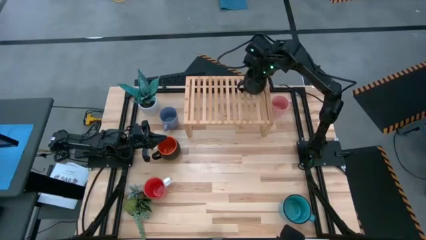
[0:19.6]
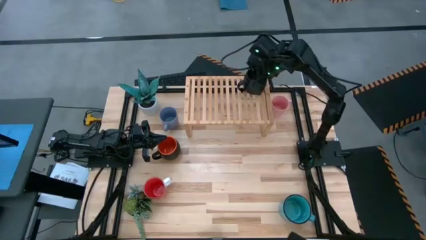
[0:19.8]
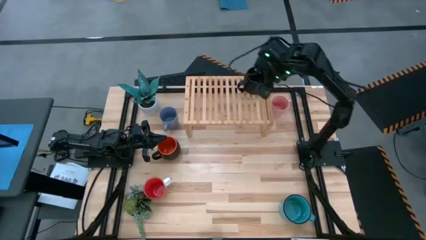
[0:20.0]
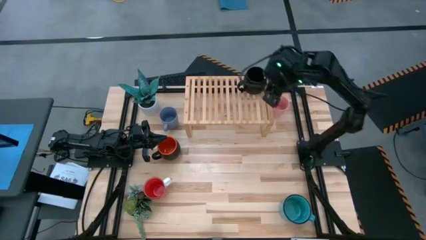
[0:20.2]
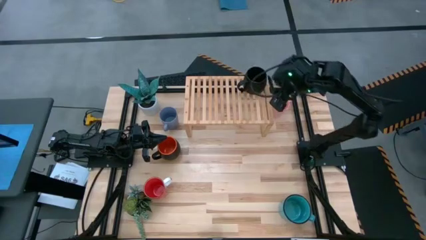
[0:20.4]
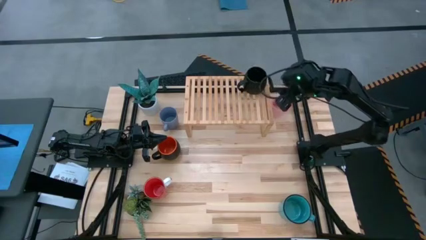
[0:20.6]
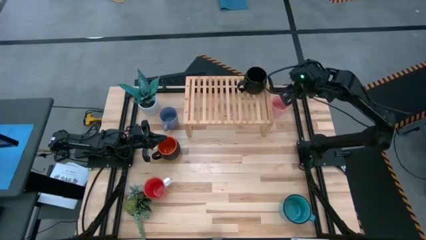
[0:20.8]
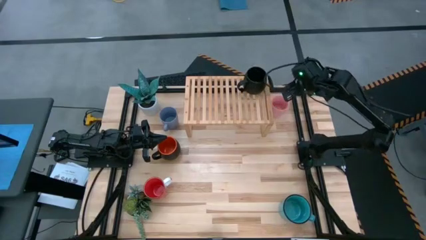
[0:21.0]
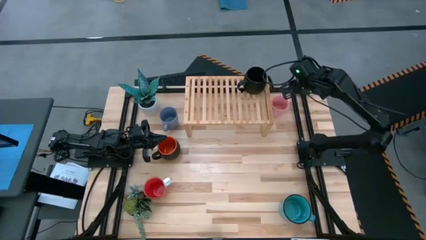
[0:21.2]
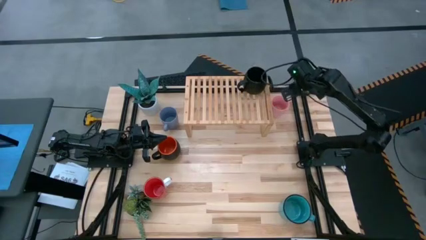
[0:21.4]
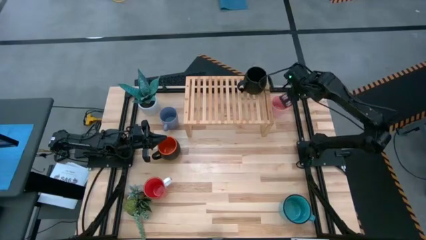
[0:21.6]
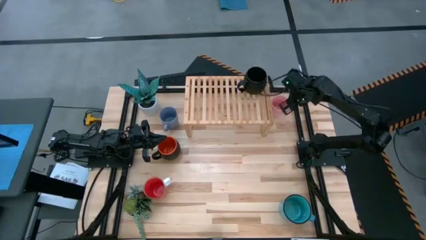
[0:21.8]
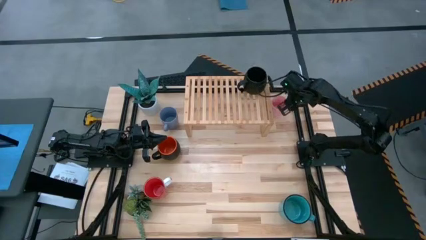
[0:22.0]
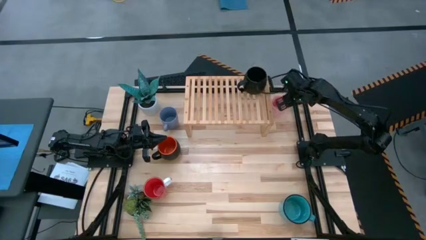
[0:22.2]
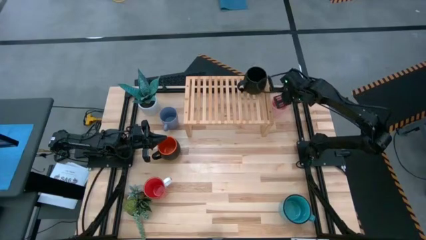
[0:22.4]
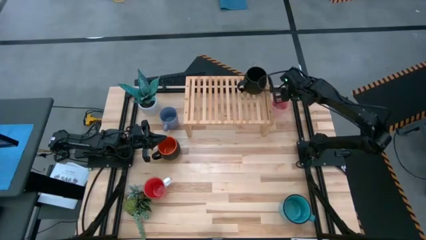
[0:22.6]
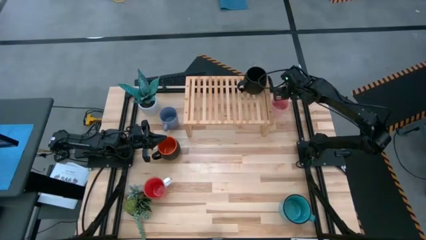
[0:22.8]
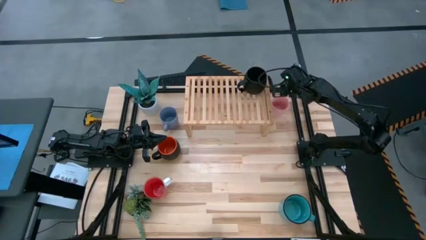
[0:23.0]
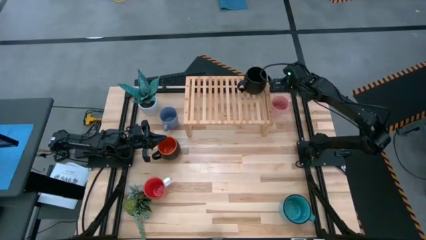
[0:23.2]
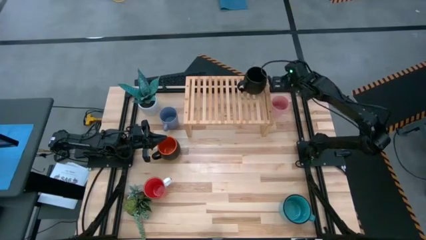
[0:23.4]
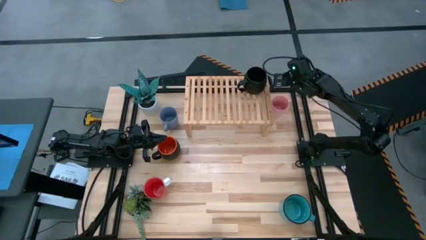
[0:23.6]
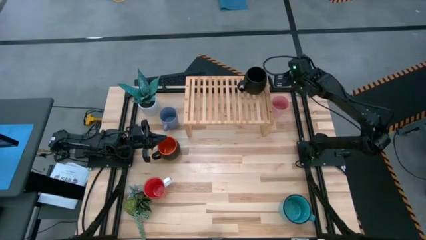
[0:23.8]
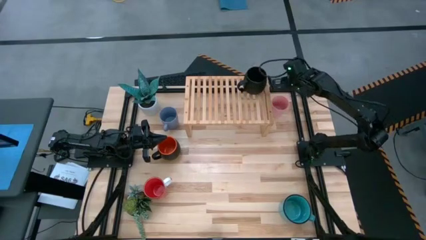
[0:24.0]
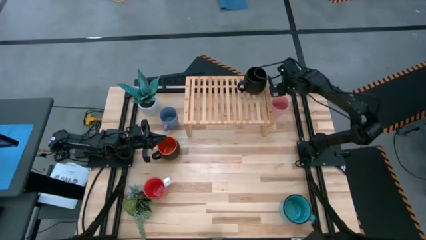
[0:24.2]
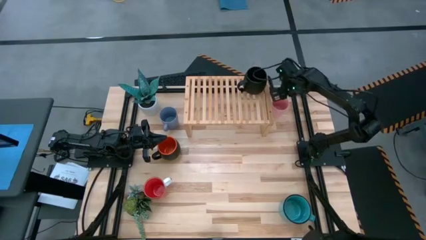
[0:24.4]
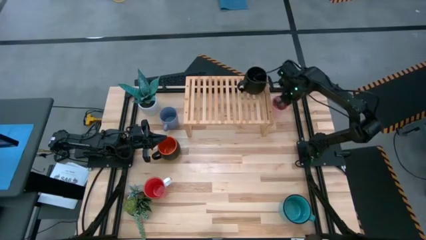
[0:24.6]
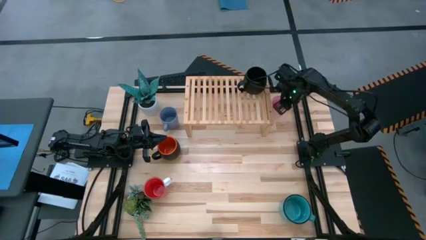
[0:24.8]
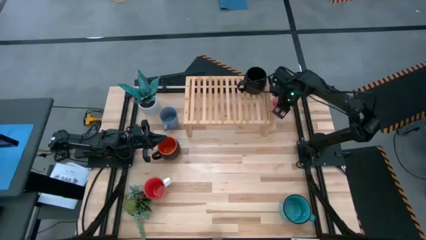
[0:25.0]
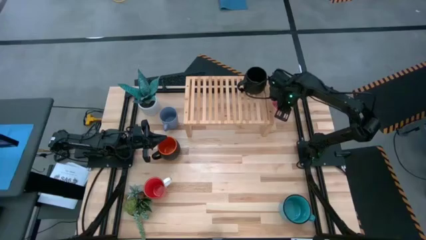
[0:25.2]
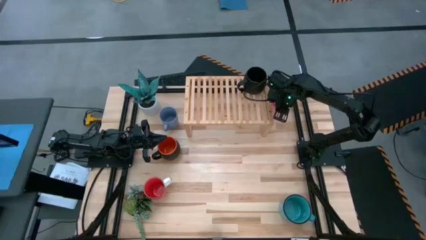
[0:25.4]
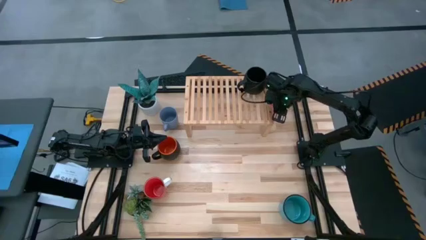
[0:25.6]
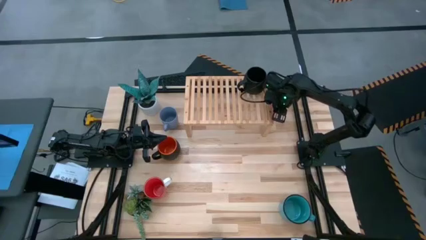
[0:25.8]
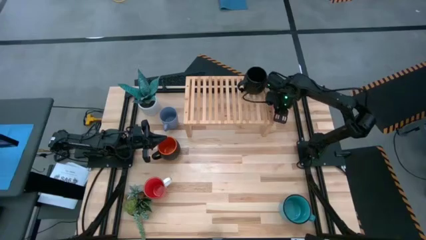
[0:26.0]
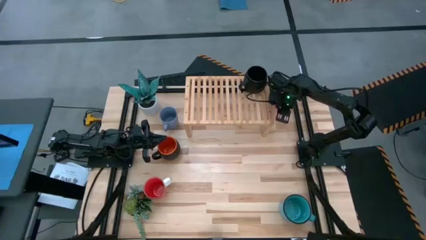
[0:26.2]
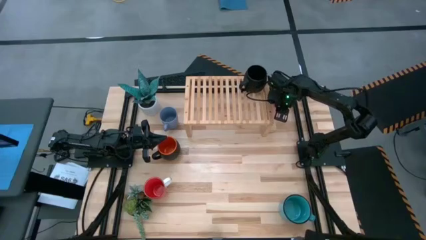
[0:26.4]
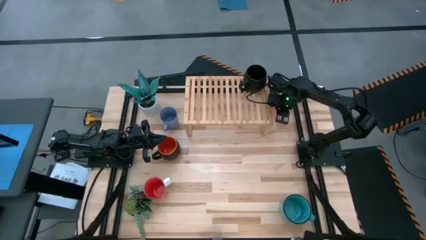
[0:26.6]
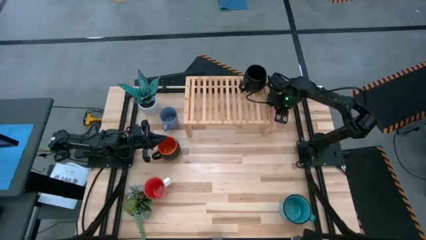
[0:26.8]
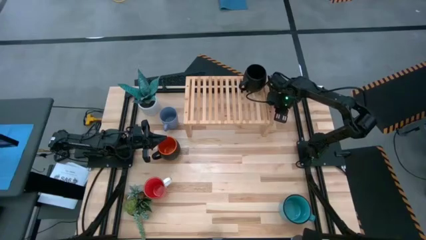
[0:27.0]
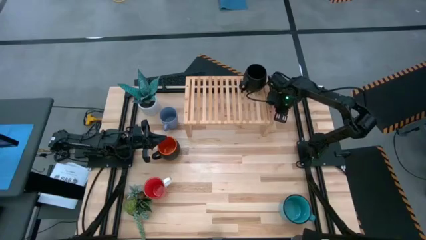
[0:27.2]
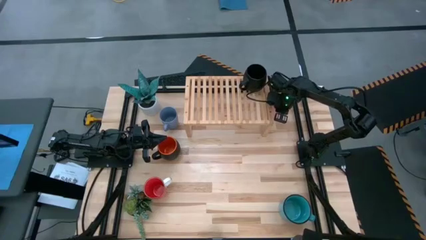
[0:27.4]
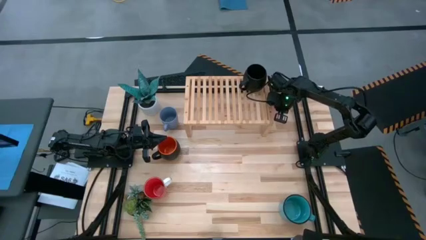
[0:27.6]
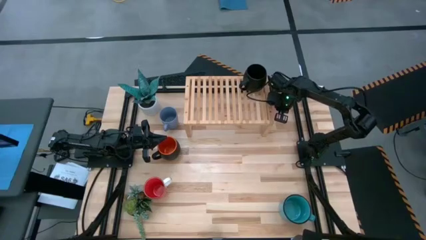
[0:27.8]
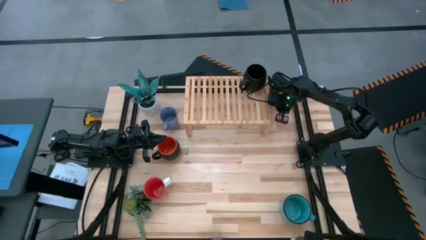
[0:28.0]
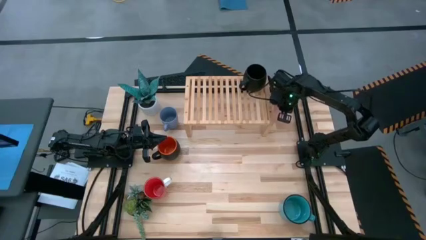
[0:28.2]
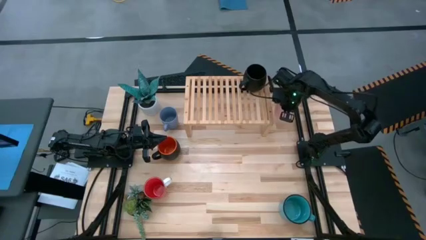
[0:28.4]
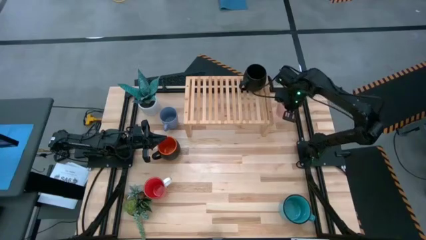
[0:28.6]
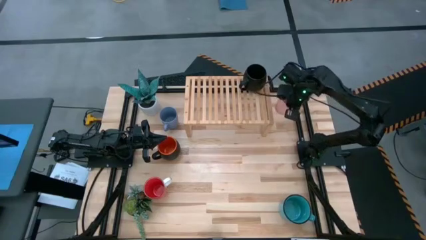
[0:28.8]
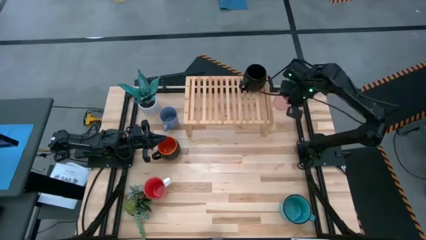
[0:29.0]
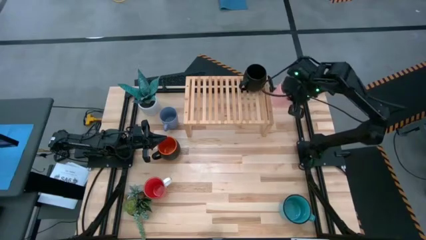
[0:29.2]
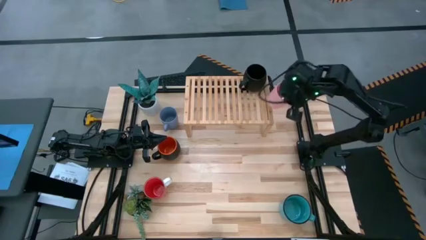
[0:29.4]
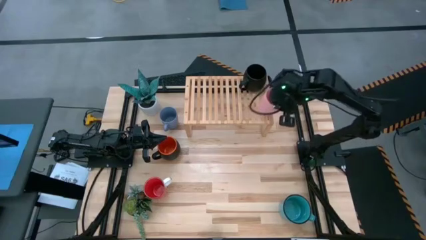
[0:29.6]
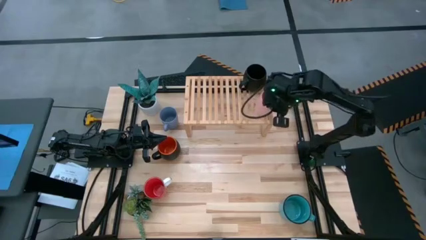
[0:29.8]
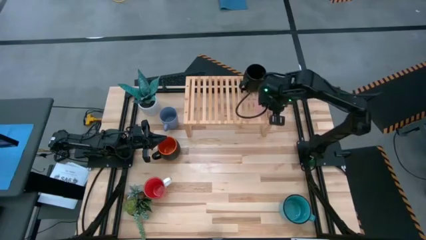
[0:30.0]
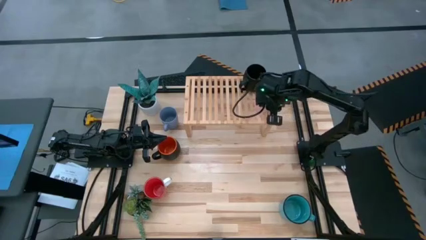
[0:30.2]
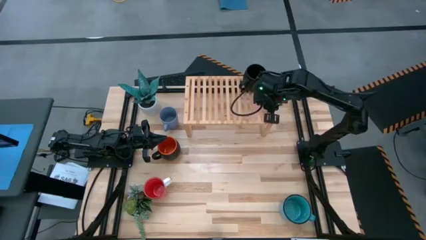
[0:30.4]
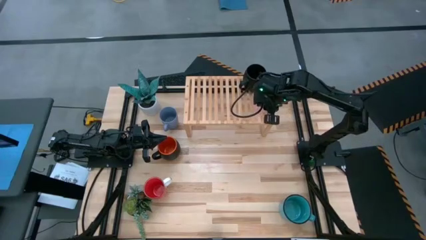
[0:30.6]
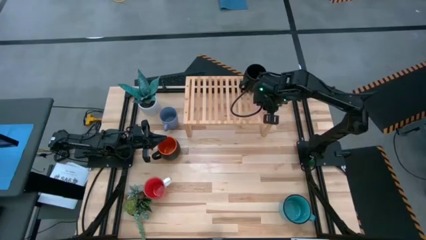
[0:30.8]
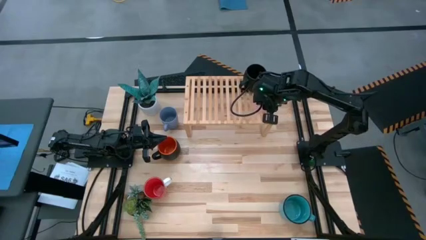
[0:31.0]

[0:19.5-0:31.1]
Task: Place coffee mugs
Put the pink mug on the shelf
